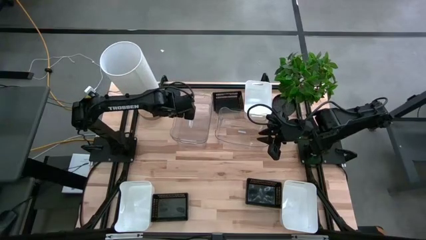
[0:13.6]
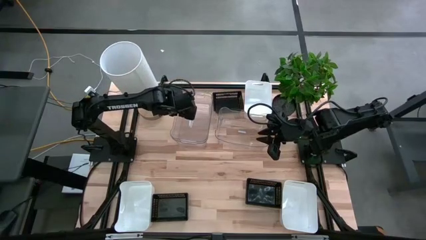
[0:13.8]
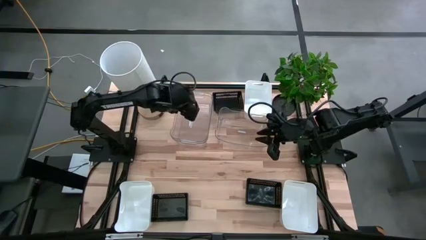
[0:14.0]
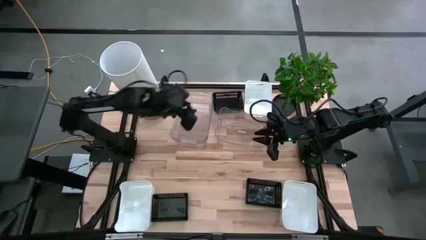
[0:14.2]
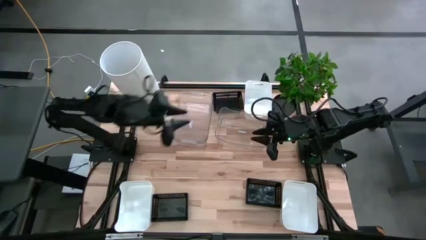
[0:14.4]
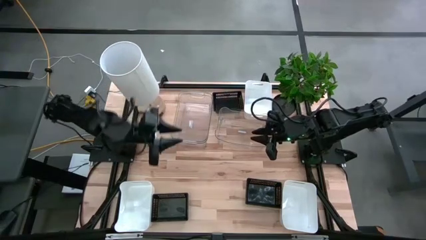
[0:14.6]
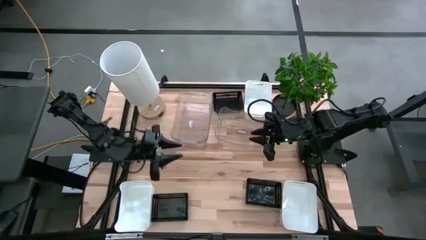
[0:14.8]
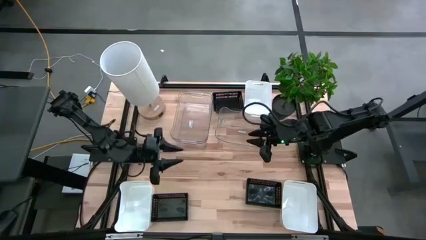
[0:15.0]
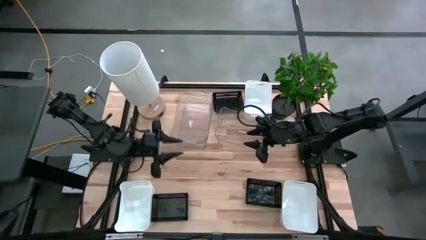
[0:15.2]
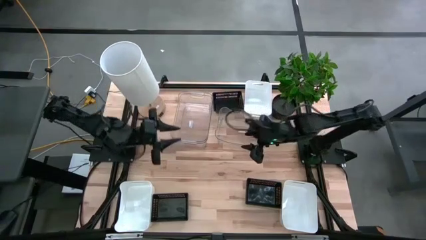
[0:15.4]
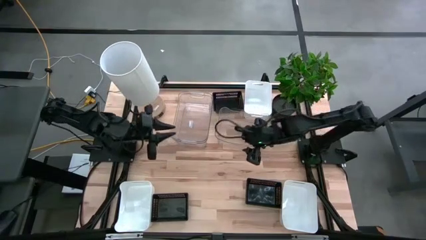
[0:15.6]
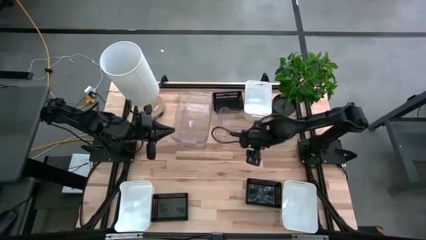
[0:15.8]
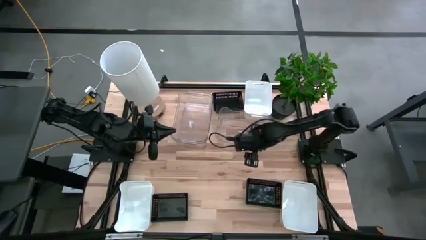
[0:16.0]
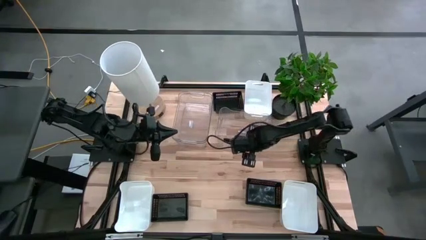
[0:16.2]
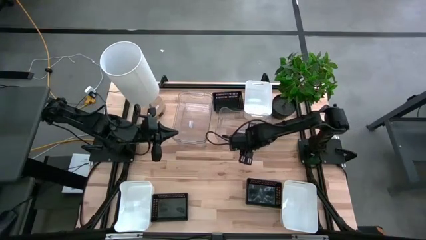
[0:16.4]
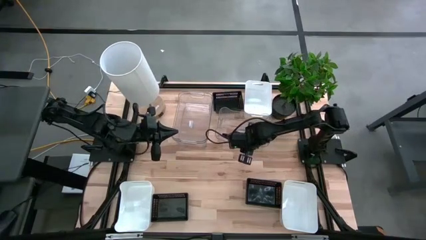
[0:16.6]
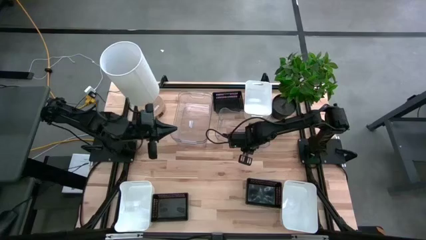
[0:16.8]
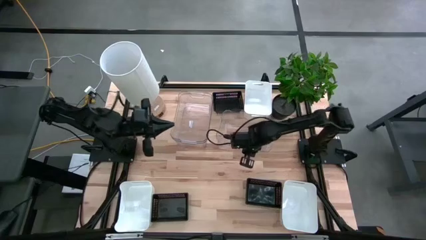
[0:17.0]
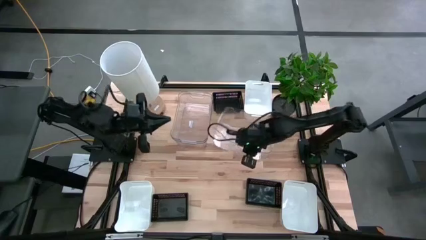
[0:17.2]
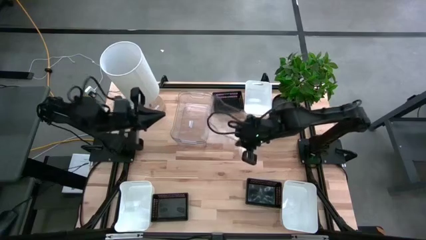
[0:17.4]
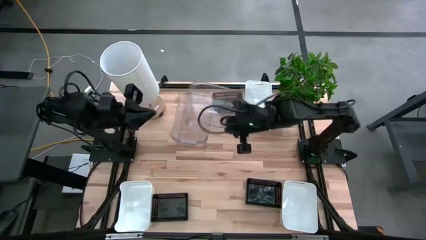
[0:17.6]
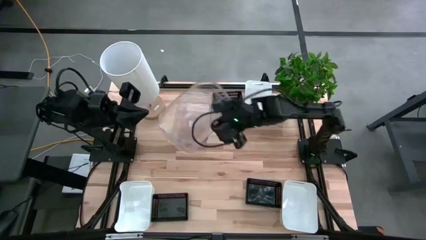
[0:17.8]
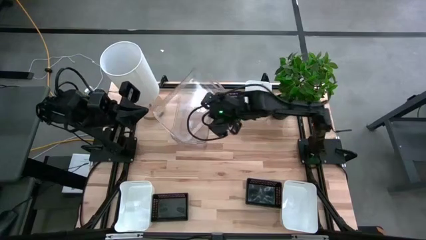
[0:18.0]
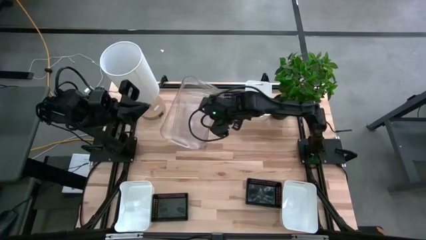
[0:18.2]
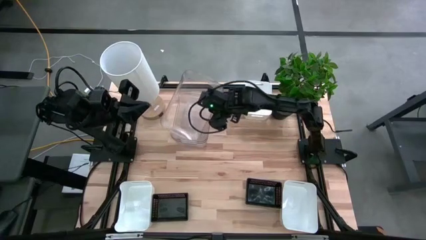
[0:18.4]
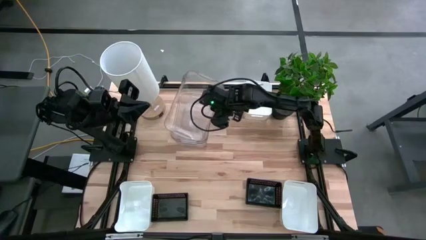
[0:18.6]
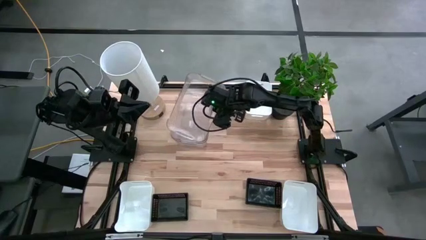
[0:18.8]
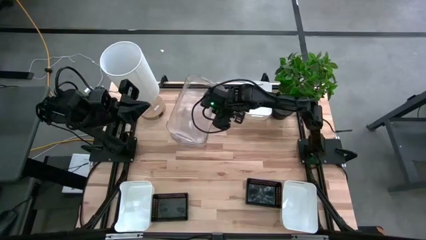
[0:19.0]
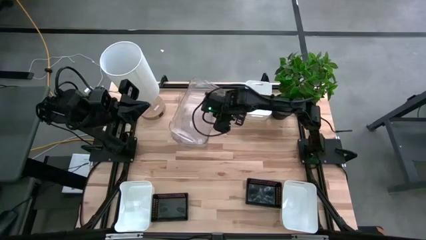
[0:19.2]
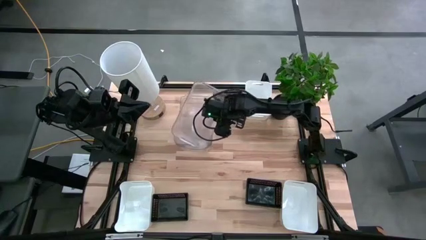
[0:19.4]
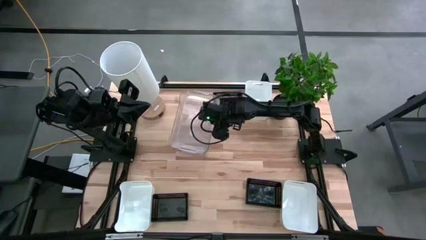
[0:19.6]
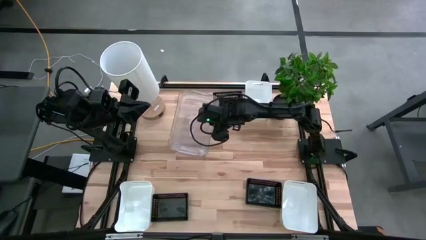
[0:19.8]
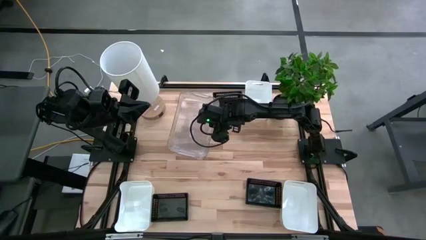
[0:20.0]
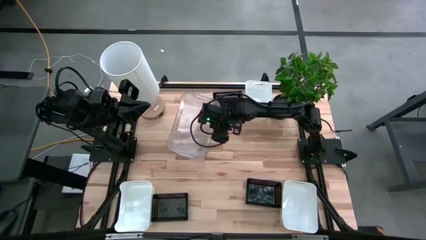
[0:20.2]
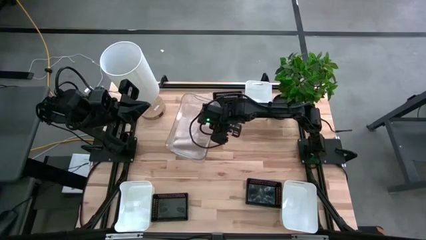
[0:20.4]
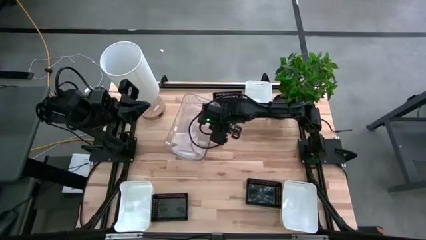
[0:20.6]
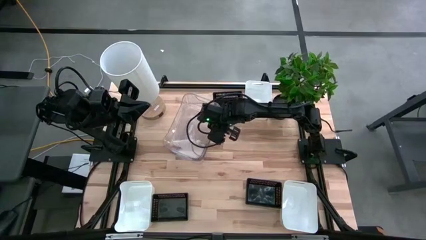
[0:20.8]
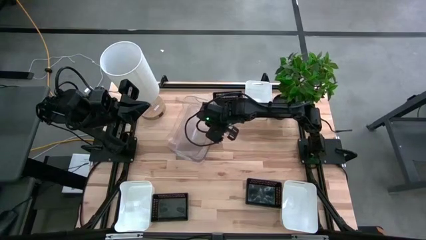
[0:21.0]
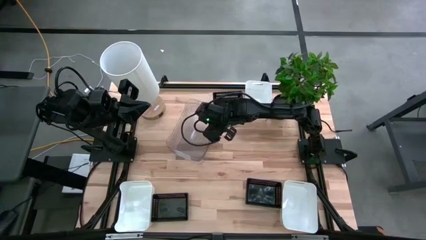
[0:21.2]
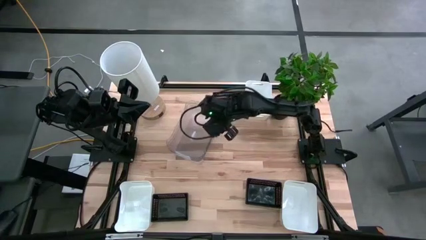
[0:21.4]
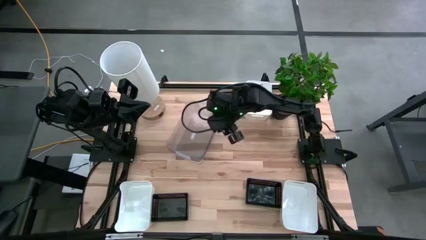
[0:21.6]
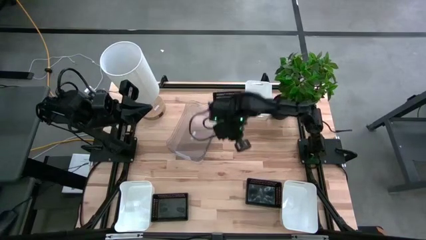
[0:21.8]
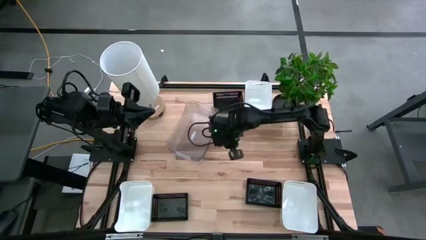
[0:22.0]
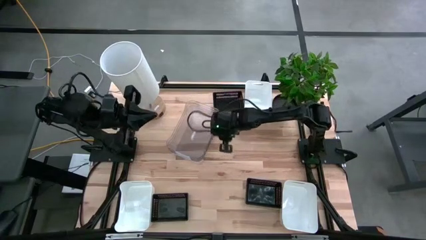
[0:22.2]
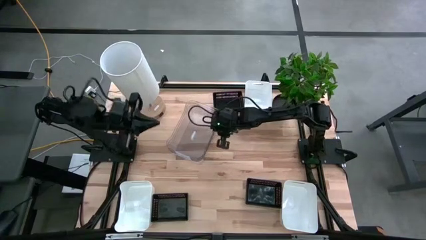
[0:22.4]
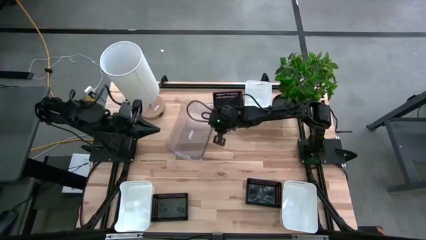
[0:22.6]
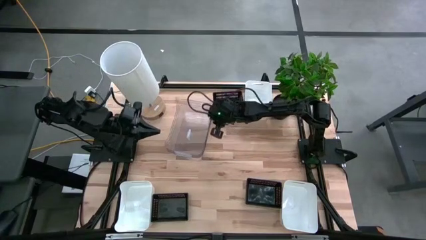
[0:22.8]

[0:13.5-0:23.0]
Stack the right transparent bin on top of the left transparent bins

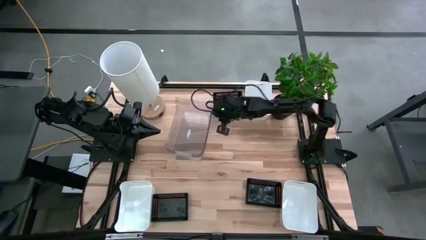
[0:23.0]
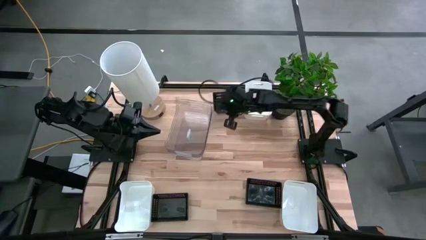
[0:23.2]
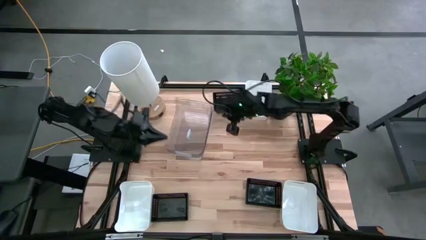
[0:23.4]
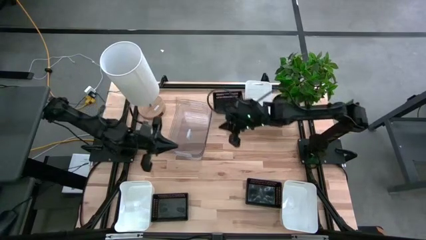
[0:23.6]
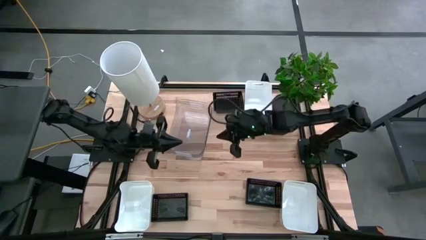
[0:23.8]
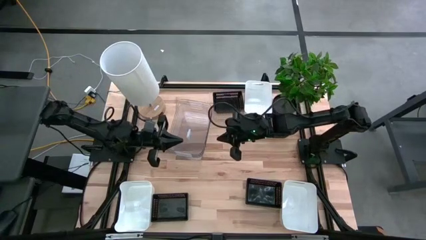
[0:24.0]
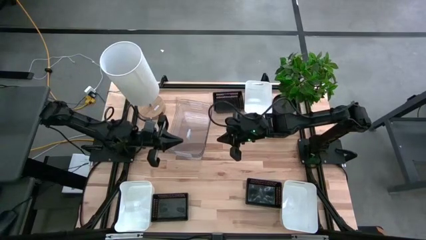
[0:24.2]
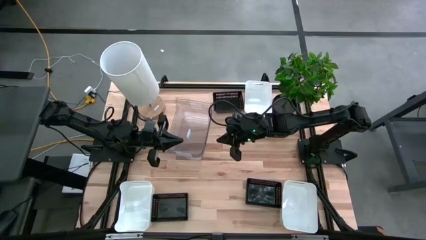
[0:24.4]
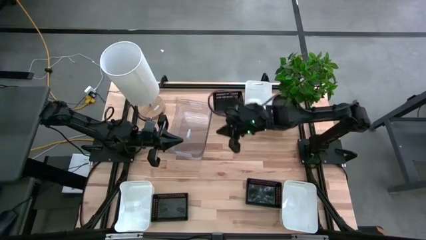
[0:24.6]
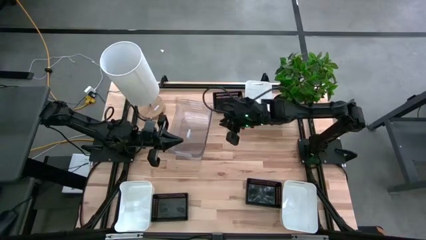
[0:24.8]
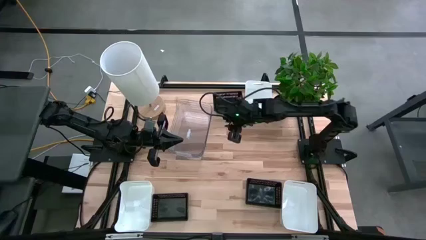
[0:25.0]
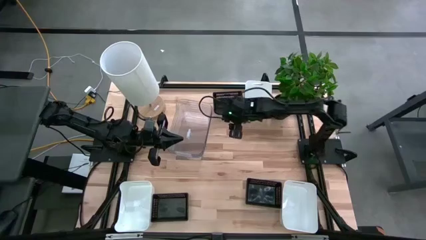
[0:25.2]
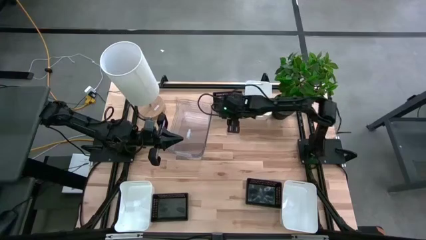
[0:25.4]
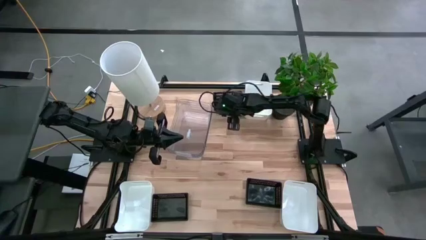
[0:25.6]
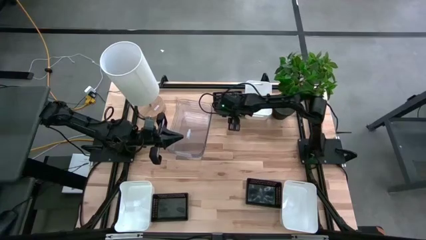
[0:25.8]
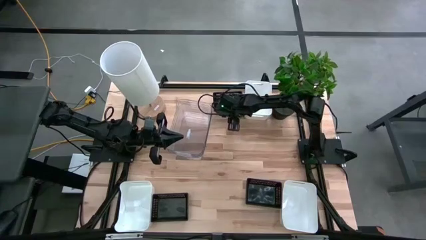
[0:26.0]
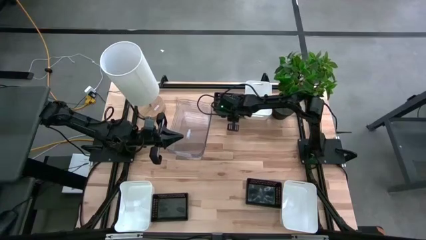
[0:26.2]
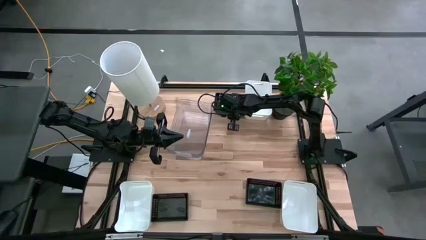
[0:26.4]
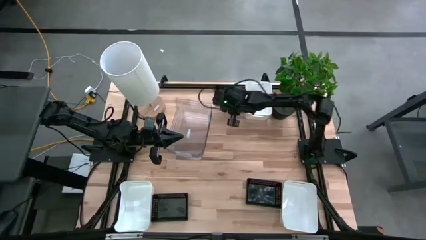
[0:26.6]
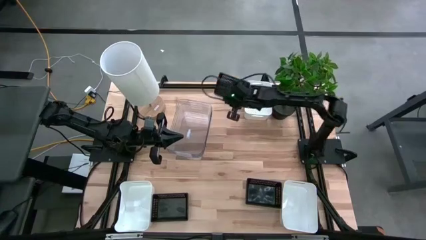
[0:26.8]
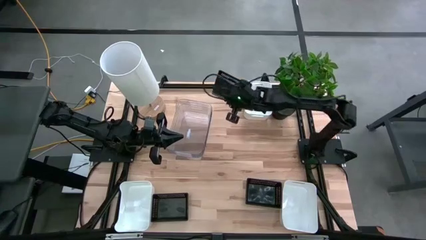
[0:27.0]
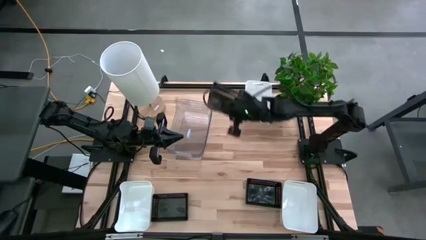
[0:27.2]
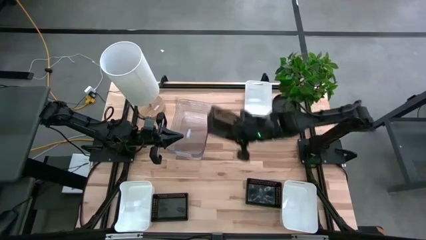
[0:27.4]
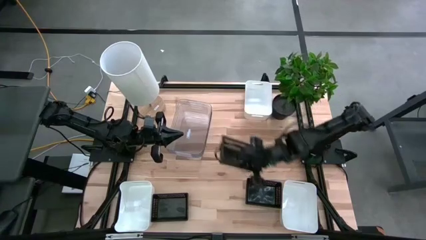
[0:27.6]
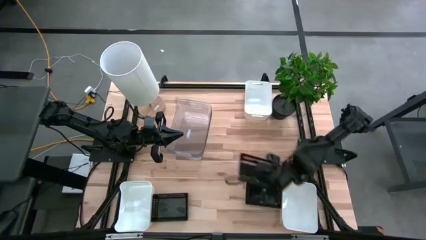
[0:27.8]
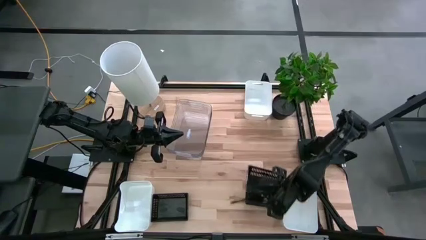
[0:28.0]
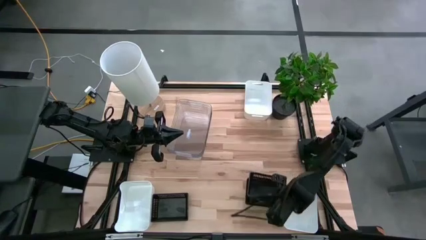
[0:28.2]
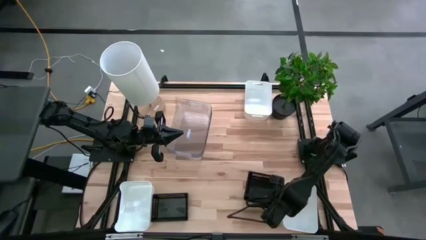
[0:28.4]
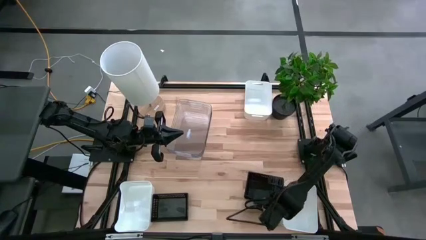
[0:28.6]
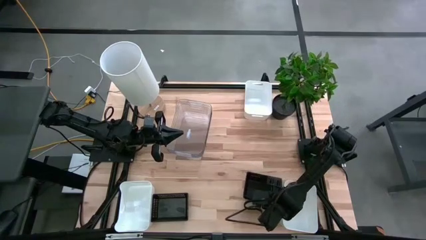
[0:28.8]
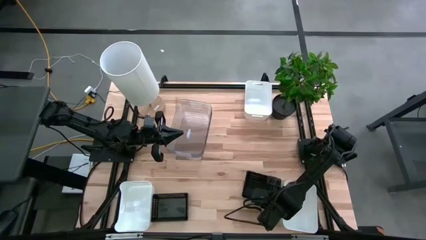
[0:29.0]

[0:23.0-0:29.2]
Stack the top black bin on top of the right black bin

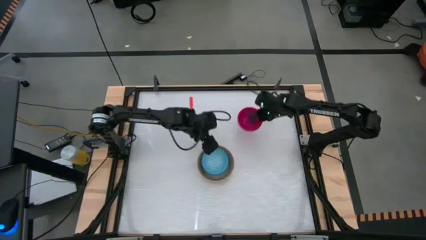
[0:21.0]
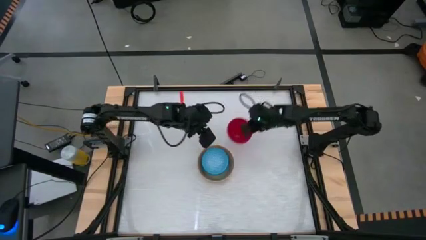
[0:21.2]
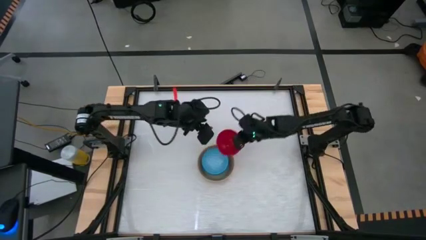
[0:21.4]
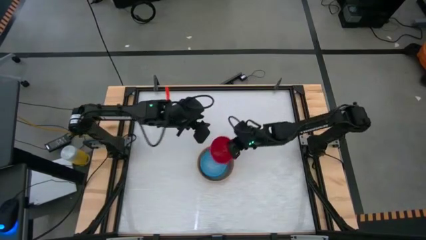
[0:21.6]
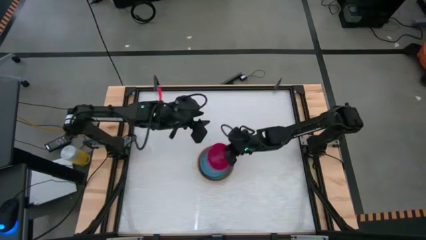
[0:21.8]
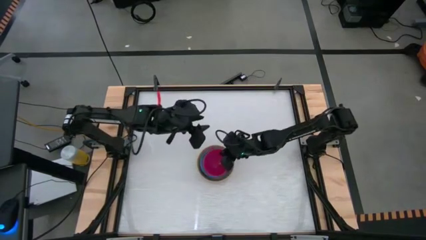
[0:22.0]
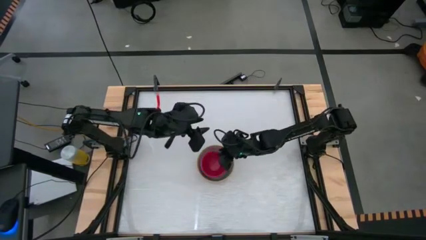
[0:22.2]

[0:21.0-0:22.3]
Stack the red bowl on top of the light blue orange bowl
